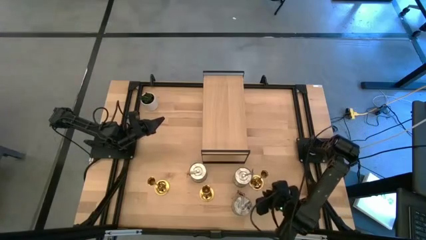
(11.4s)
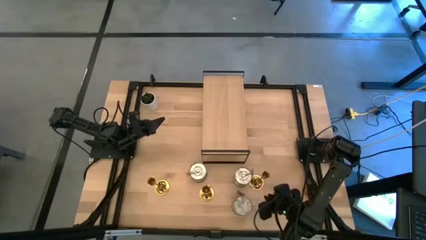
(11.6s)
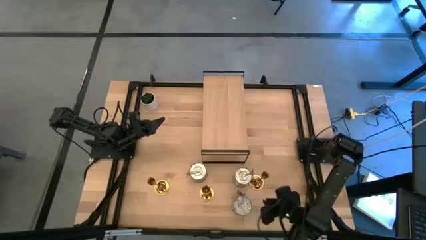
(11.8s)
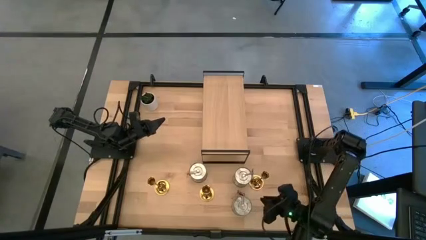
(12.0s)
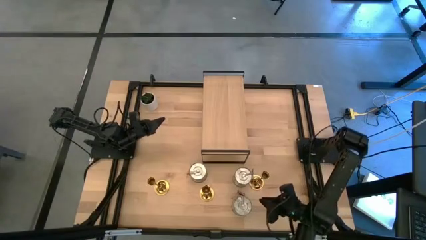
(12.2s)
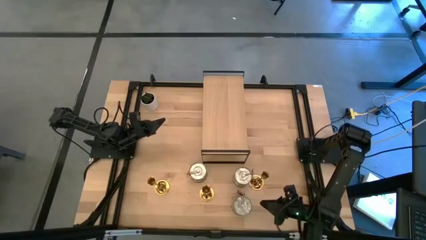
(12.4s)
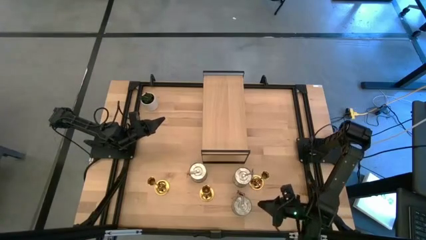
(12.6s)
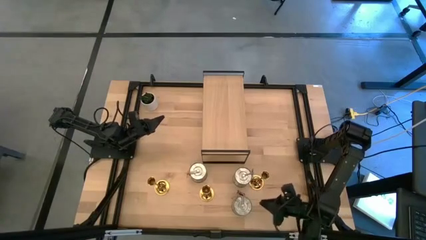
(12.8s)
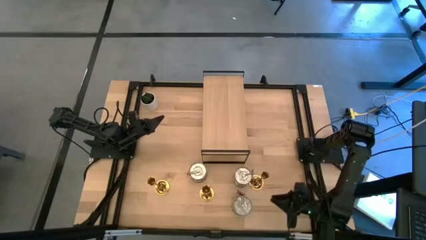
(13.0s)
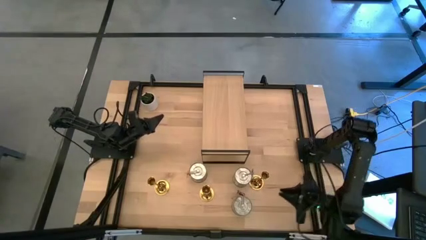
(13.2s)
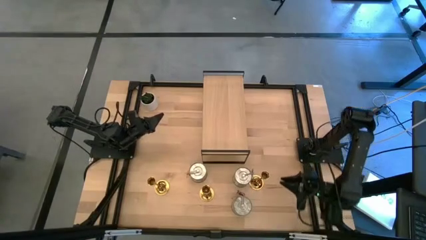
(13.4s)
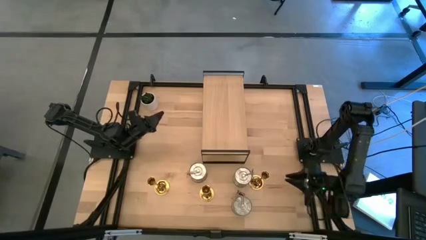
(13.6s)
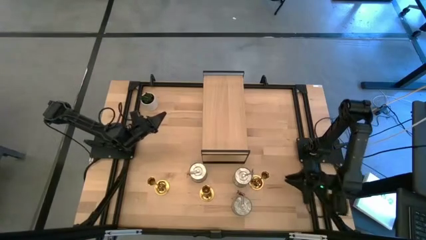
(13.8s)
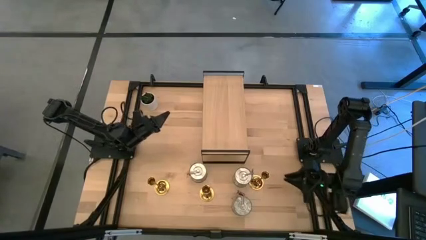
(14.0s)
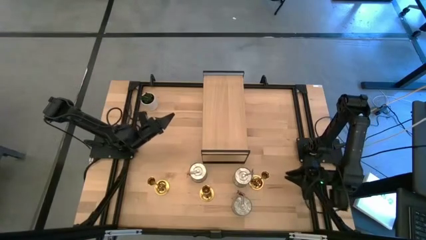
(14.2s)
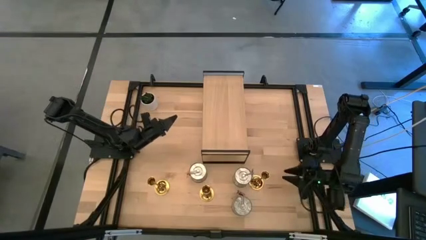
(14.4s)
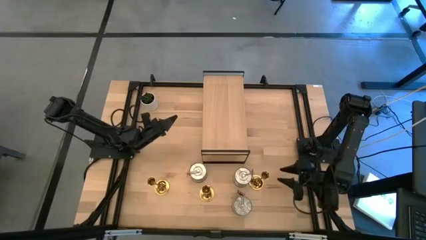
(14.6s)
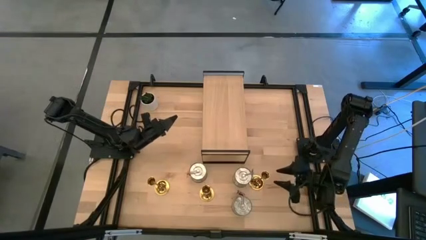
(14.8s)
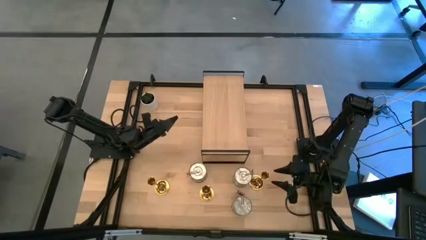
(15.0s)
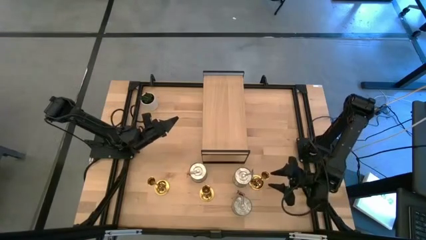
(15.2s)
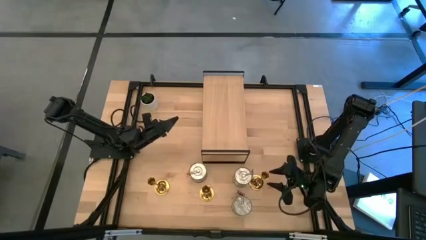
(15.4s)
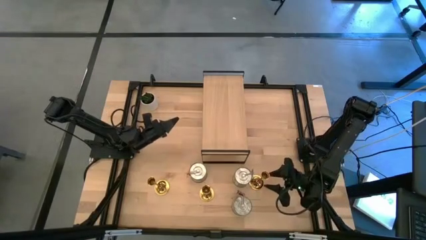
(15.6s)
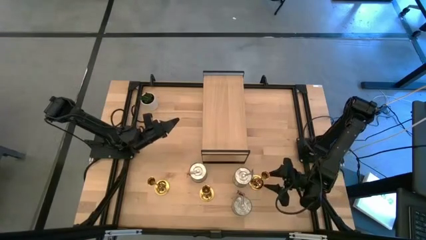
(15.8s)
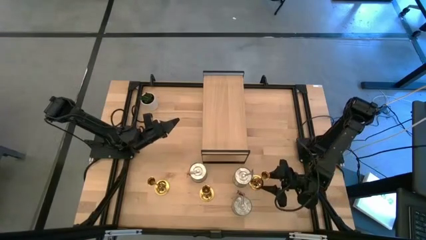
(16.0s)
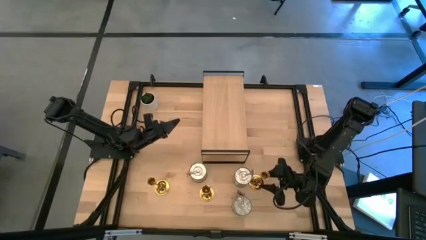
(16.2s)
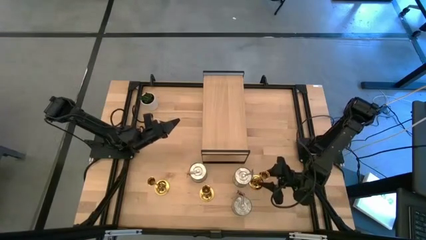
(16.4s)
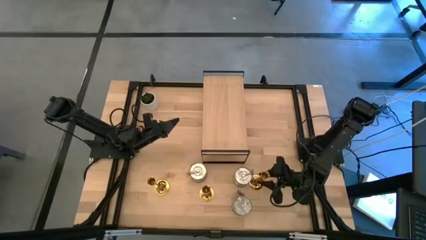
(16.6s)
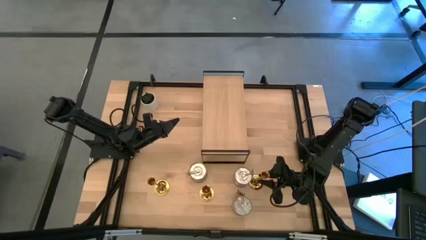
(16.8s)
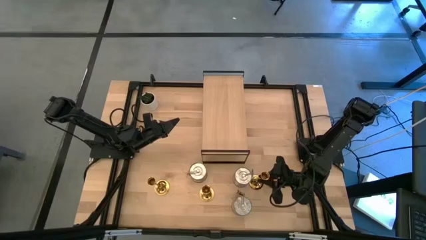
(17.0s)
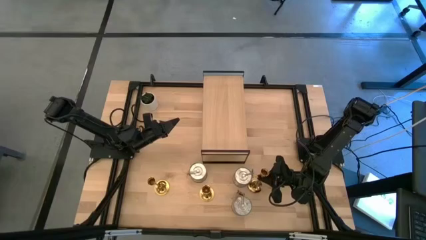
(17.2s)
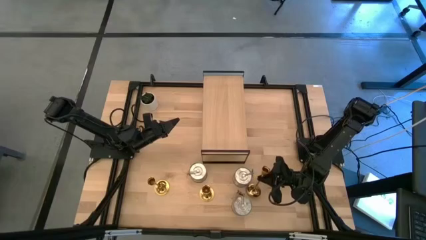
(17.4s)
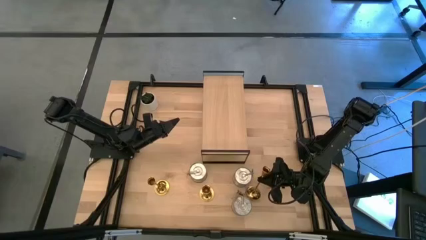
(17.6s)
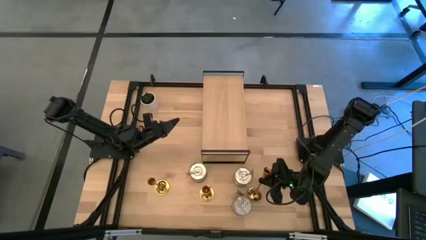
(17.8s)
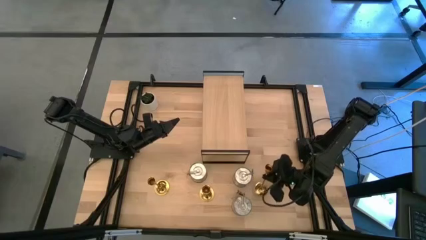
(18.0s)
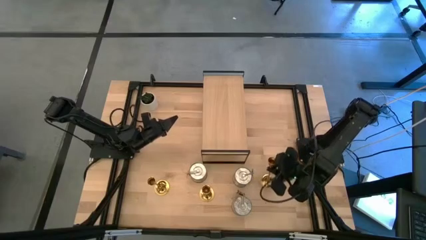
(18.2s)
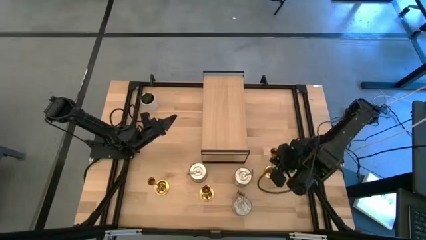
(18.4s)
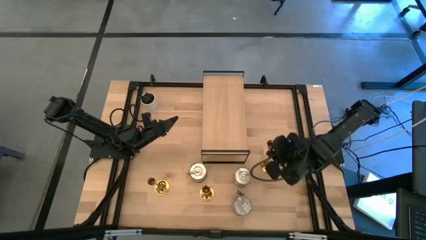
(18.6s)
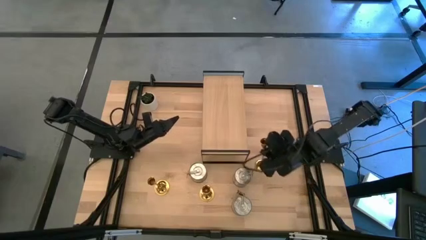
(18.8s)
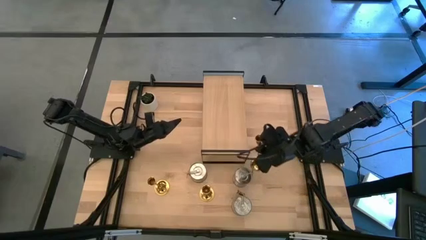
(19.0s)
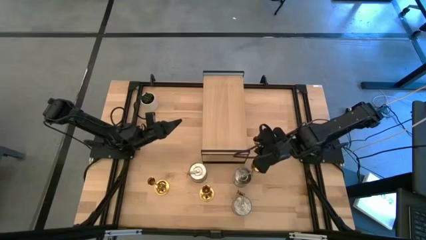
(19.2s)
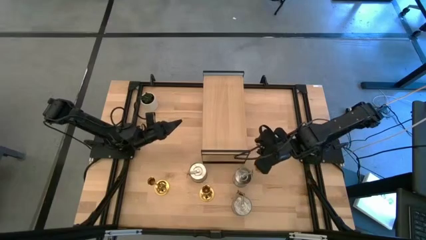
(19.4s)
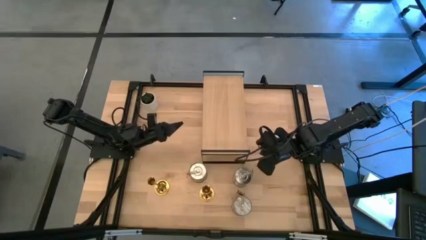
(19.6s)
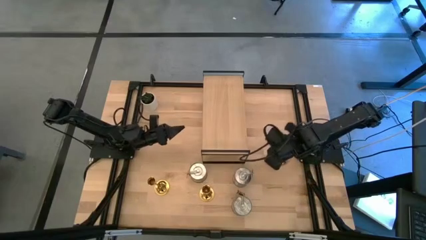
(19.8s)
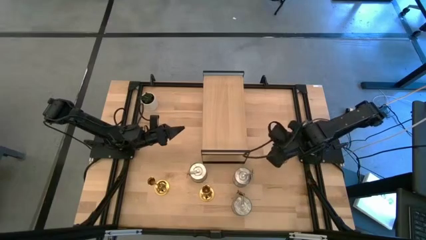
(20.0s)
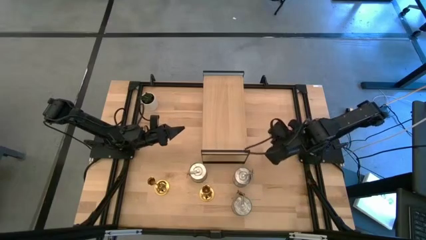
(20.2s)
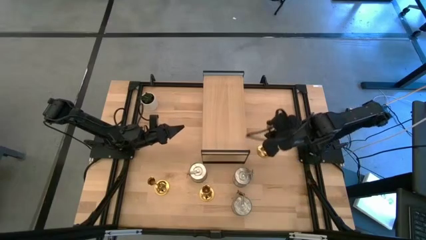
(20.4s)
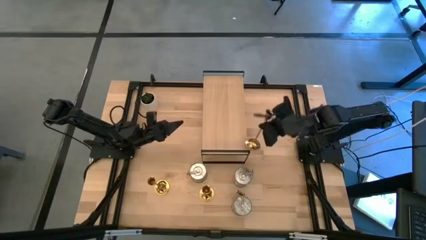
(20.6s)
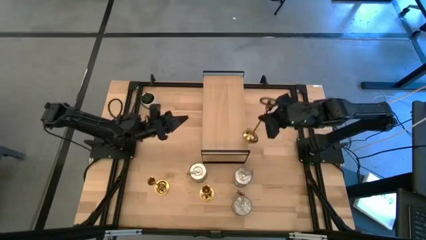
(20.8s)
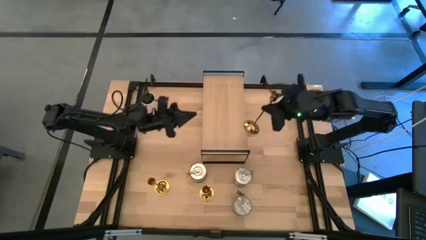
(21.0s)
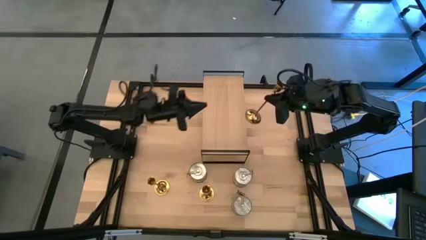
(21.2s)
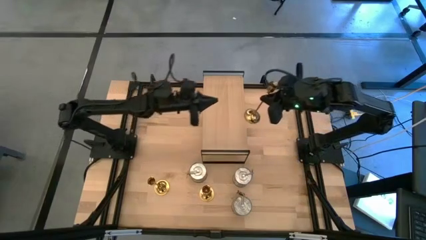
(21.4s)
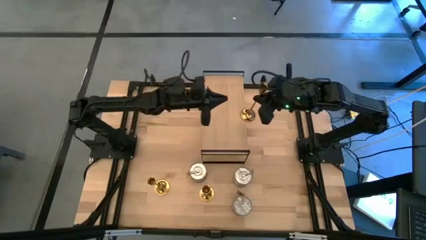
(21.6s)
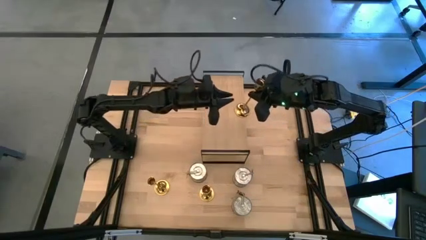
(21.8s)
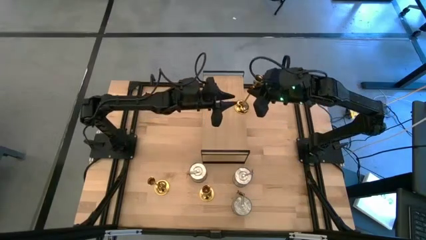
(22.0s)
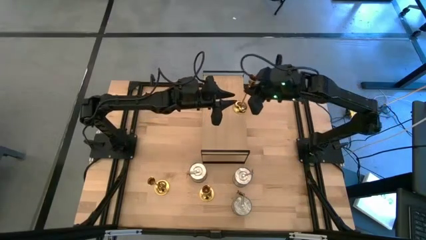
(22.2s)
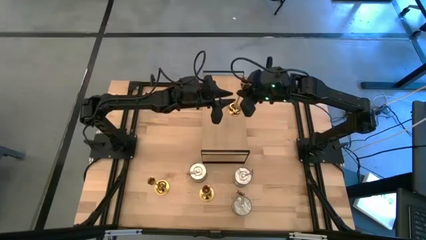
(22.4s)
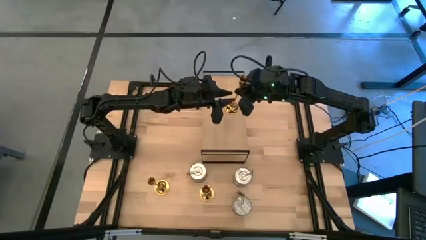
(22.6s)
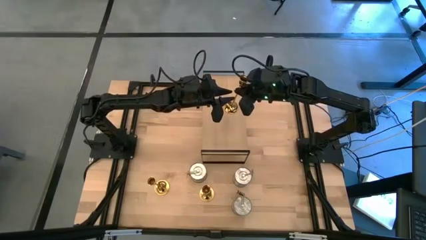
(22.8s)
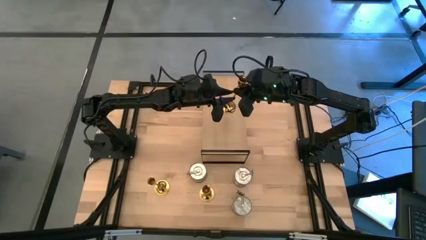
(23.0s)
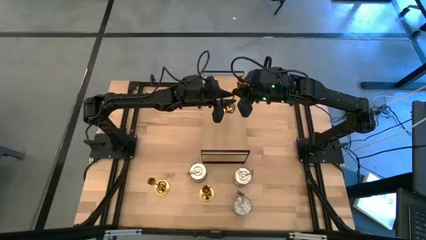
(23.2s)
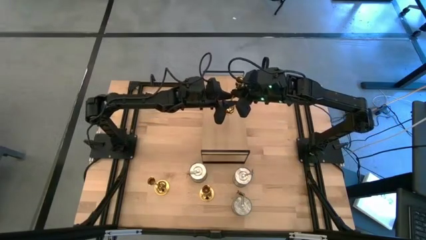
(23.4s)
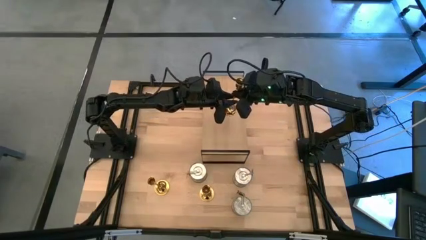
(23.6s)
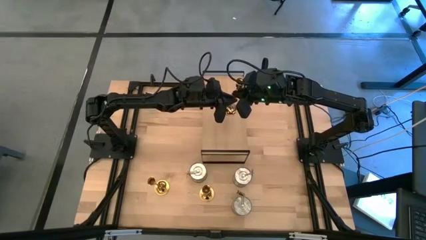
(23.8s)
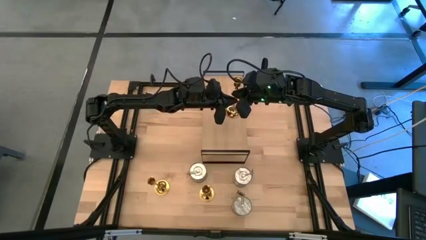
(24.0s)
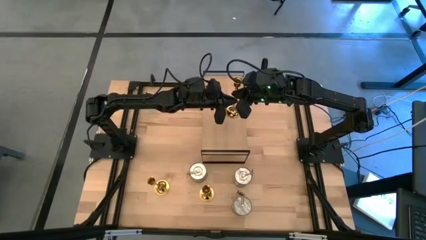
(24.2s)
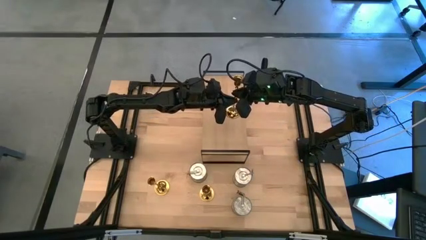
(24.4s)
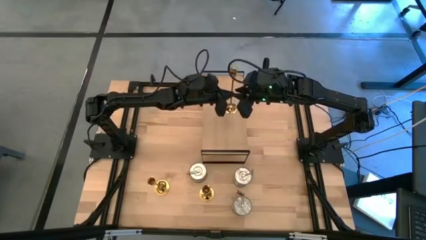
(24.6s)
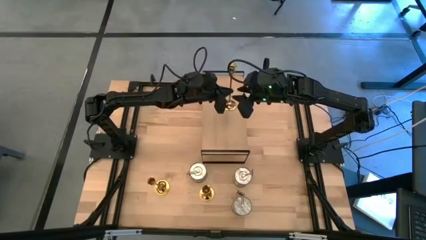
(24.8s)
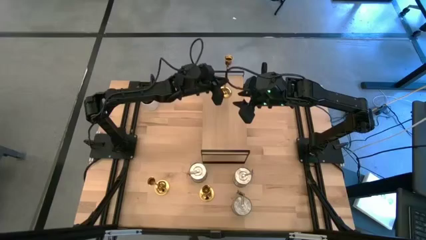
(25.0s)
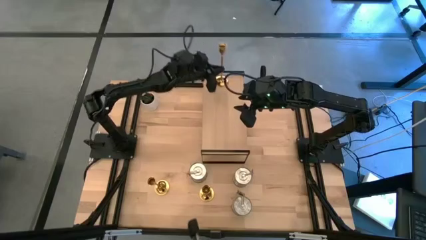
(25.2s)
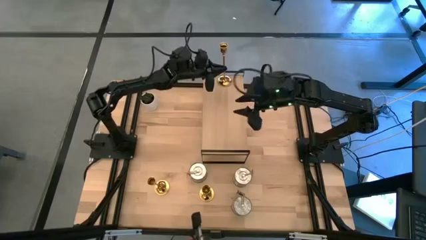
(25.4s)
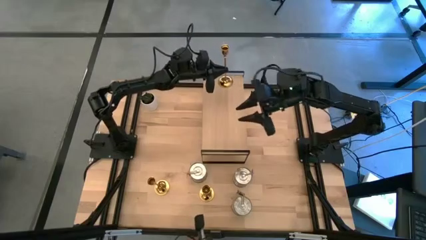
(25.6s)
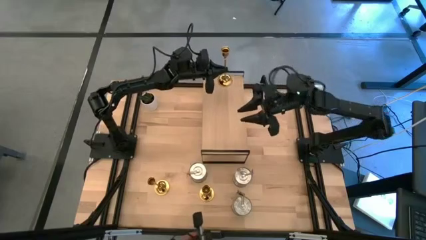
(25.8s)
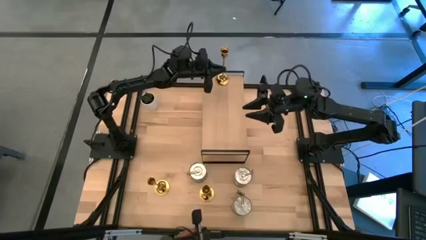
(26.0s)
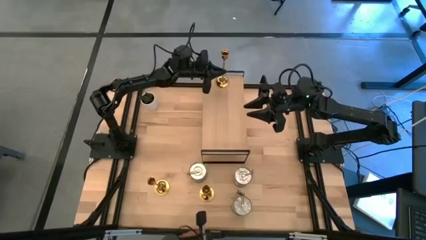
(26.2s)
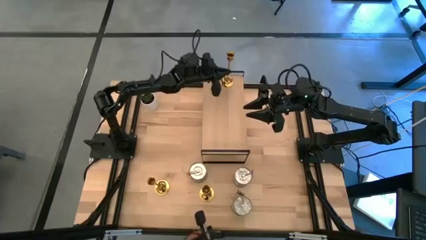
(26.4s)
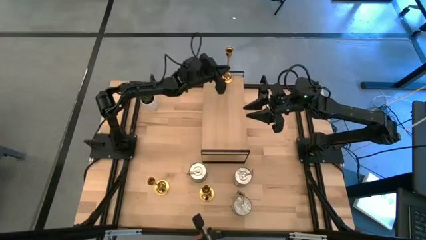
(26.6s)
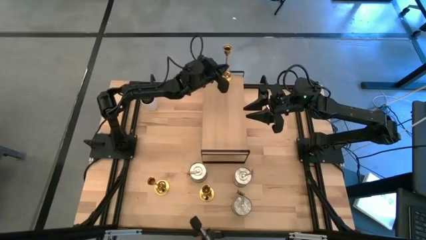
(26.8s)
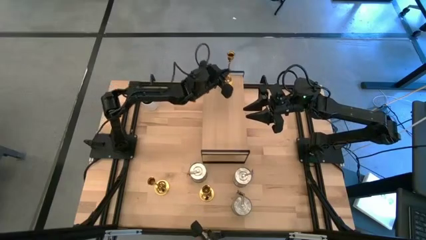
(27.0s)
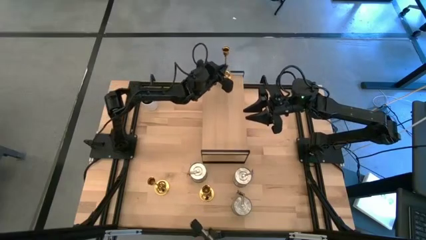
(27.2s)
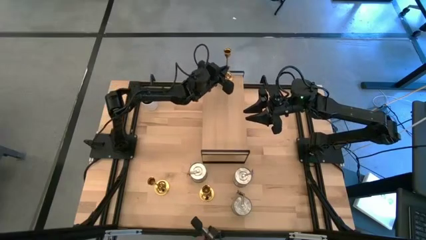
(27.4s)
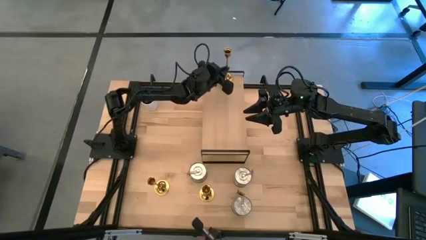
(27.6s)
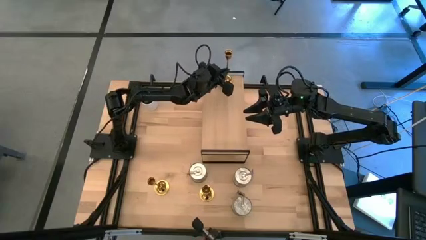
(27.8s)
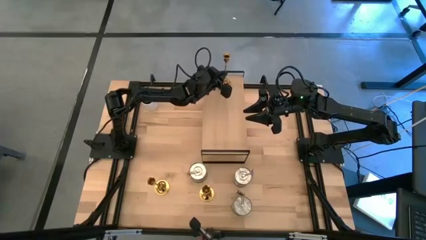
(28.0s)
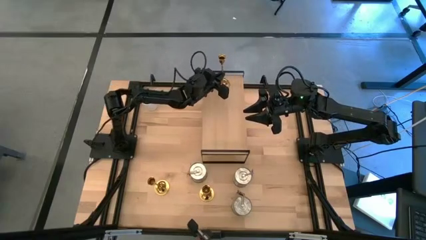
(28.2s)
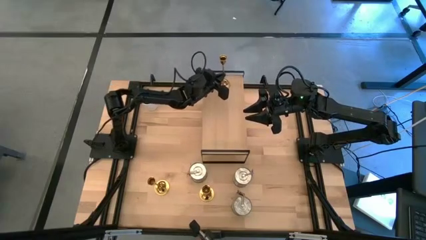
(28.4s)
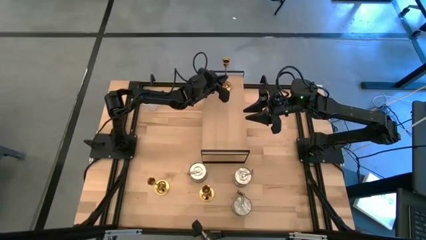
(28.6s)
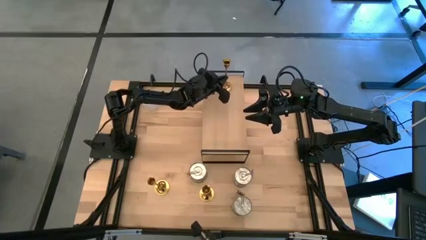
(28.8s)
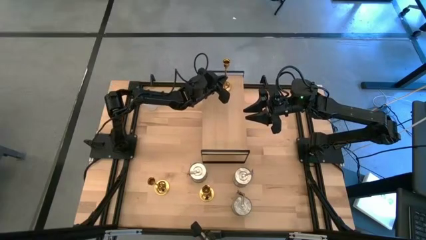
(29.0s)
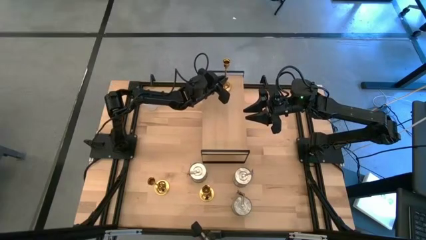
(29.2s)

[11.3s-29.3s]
Task: Pick & Place candle stick holders
Put the bottom right gold candle holder on the shelf
